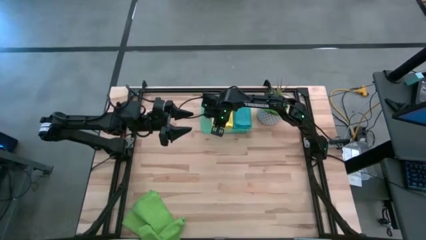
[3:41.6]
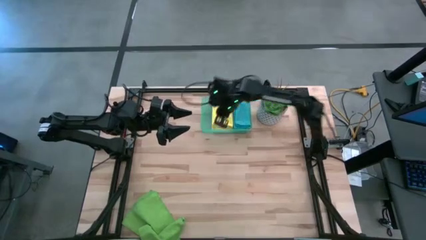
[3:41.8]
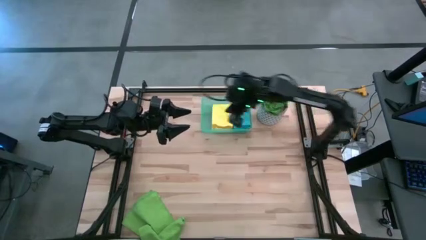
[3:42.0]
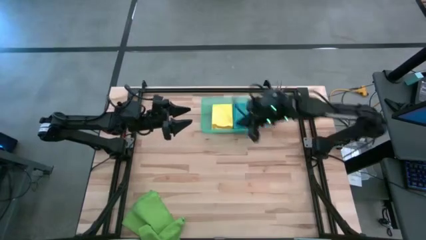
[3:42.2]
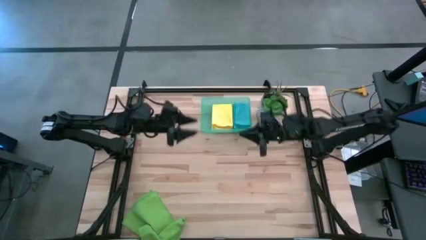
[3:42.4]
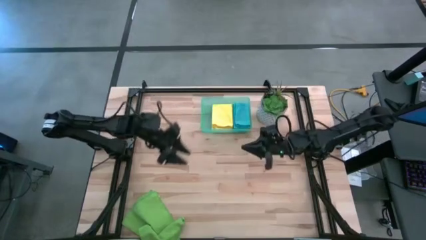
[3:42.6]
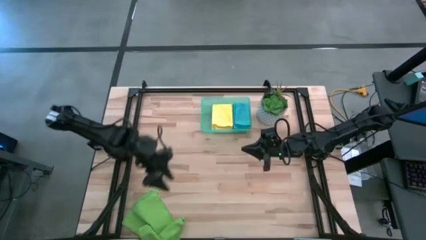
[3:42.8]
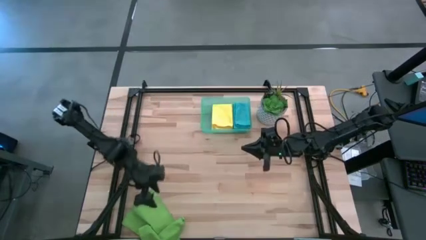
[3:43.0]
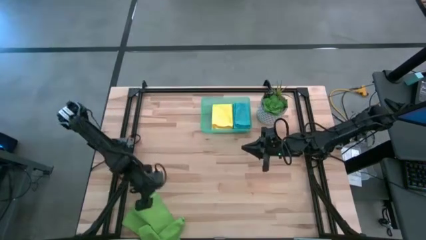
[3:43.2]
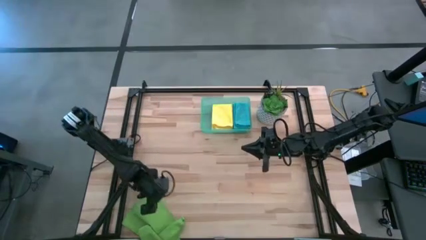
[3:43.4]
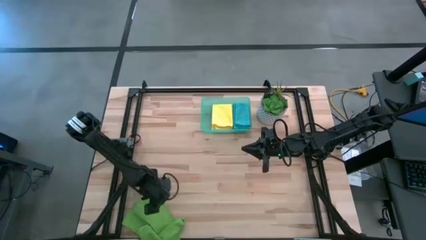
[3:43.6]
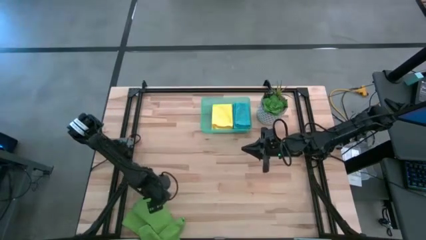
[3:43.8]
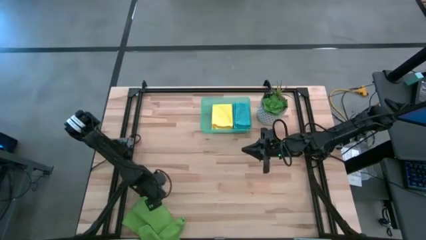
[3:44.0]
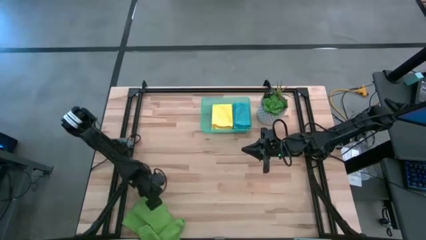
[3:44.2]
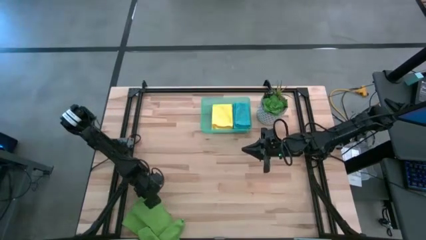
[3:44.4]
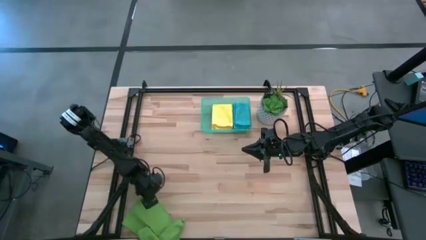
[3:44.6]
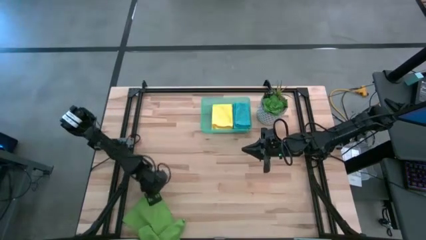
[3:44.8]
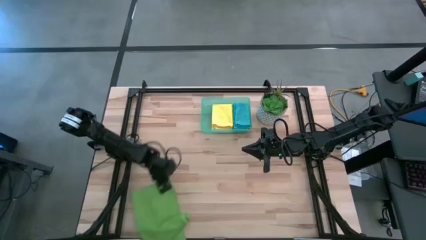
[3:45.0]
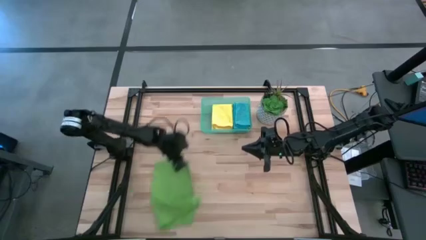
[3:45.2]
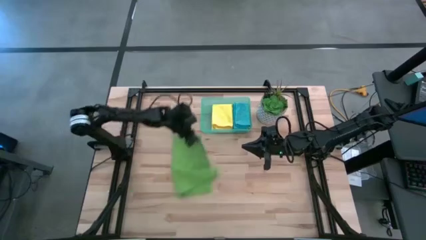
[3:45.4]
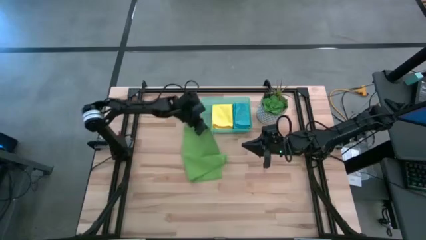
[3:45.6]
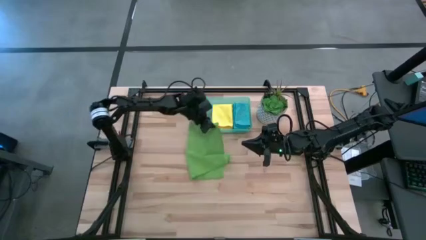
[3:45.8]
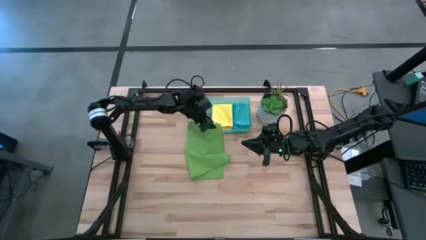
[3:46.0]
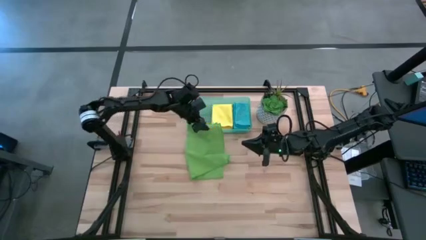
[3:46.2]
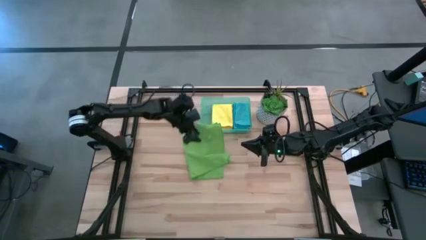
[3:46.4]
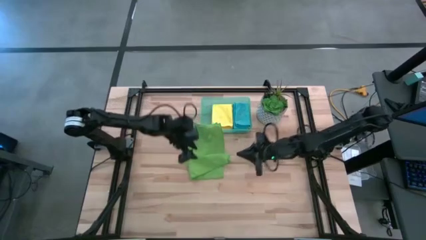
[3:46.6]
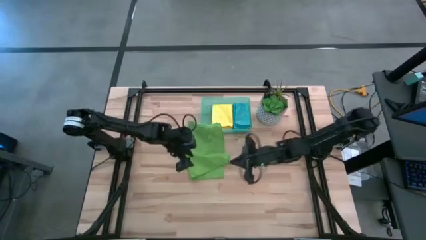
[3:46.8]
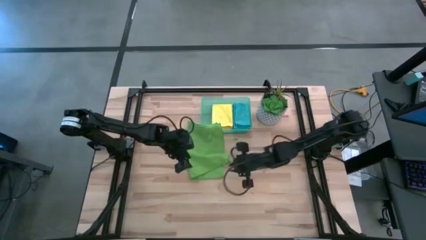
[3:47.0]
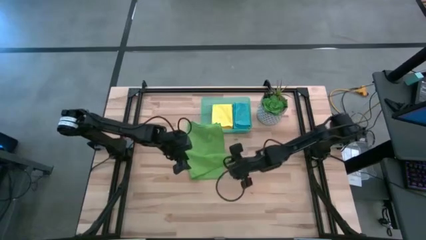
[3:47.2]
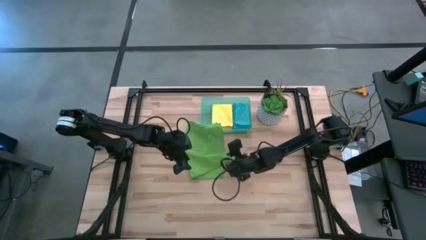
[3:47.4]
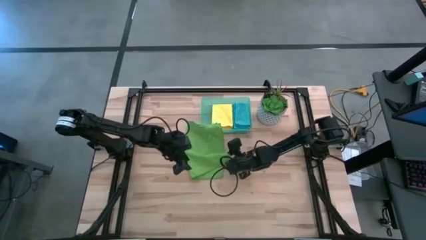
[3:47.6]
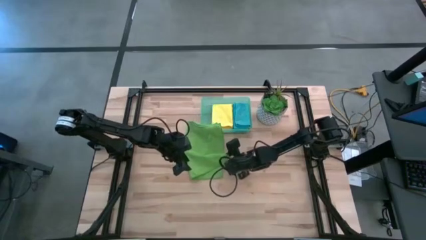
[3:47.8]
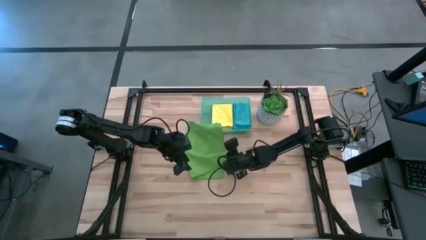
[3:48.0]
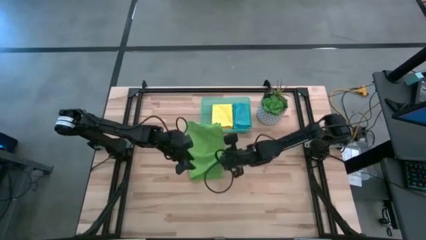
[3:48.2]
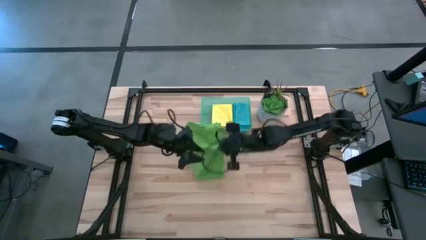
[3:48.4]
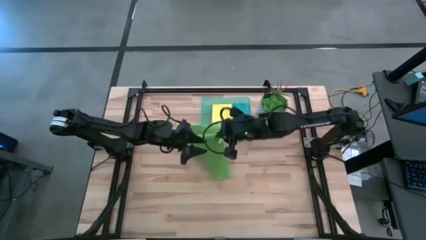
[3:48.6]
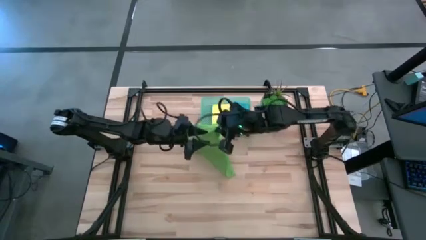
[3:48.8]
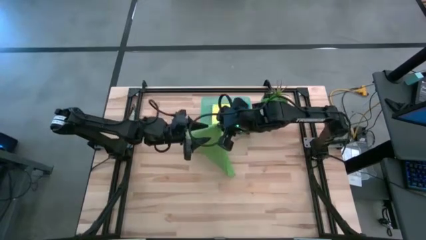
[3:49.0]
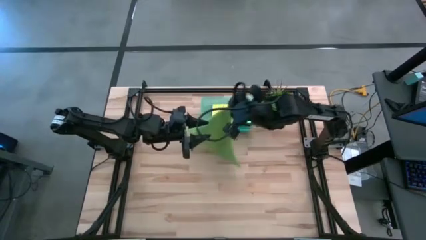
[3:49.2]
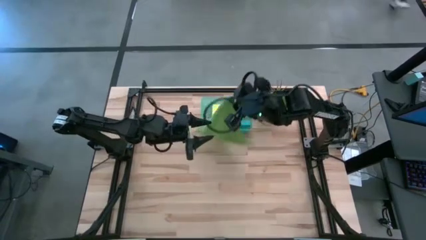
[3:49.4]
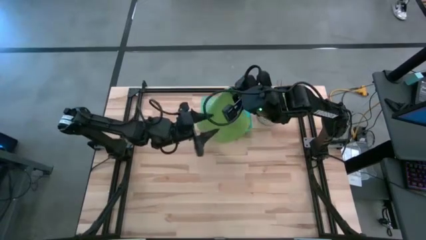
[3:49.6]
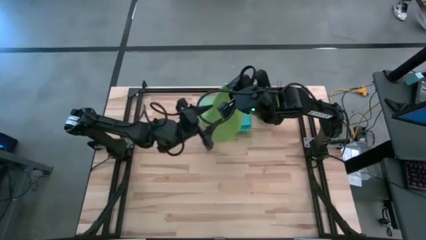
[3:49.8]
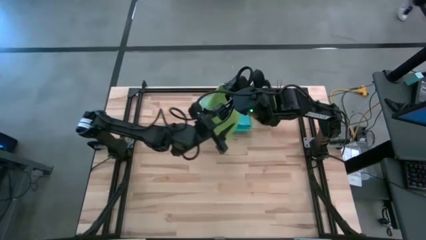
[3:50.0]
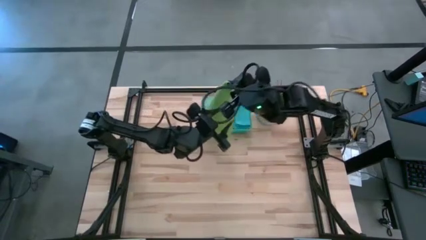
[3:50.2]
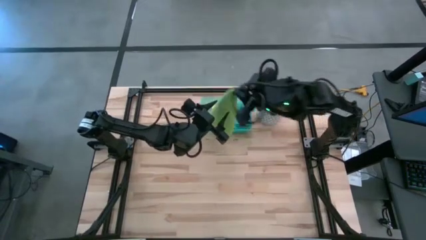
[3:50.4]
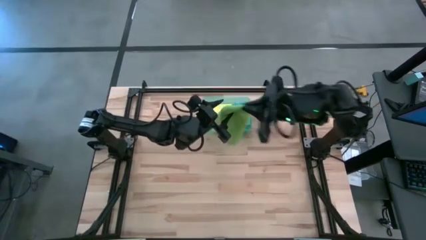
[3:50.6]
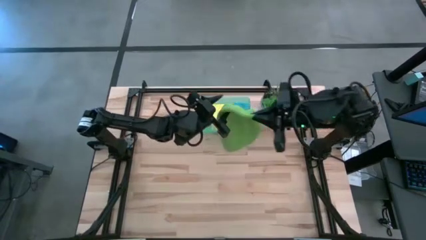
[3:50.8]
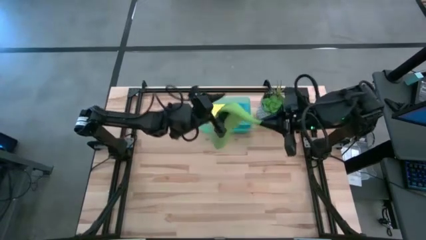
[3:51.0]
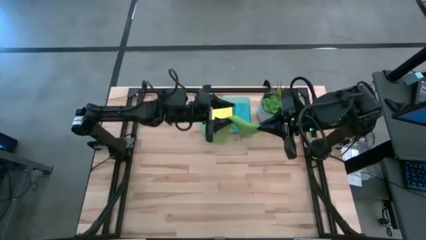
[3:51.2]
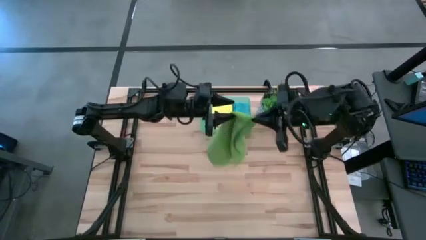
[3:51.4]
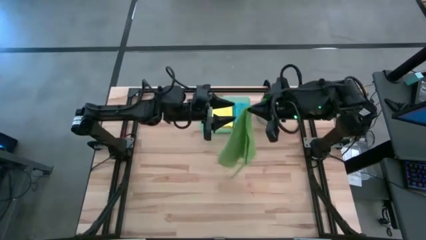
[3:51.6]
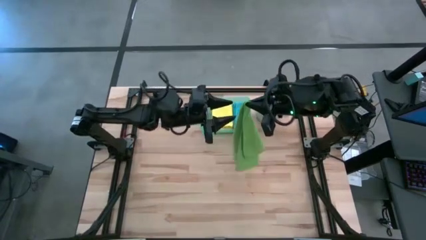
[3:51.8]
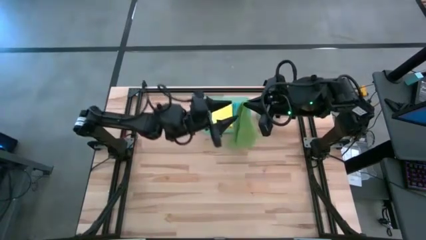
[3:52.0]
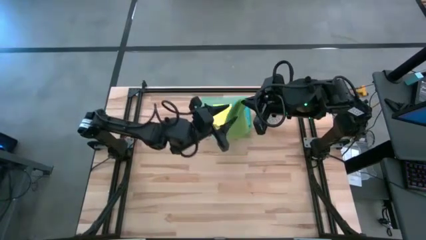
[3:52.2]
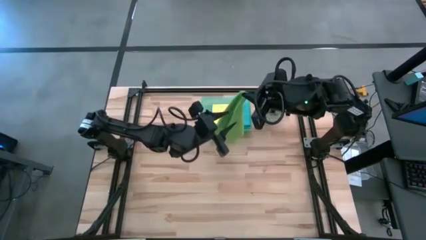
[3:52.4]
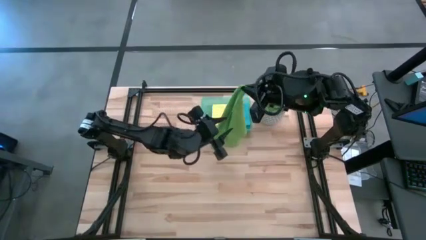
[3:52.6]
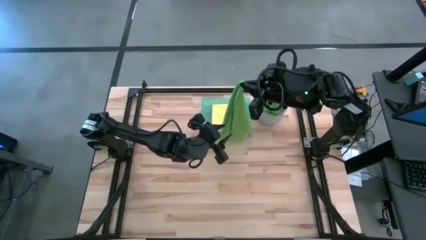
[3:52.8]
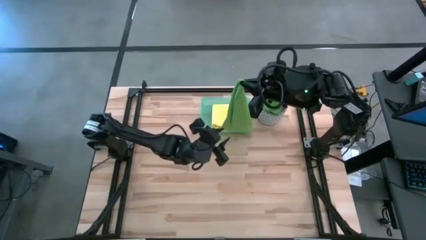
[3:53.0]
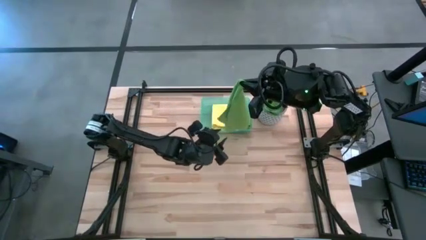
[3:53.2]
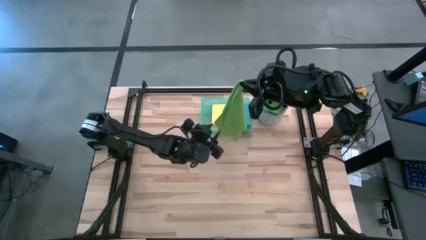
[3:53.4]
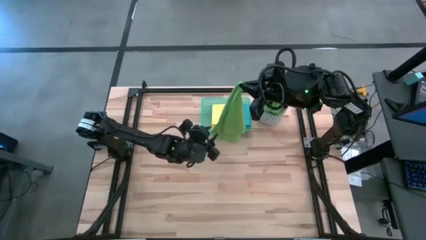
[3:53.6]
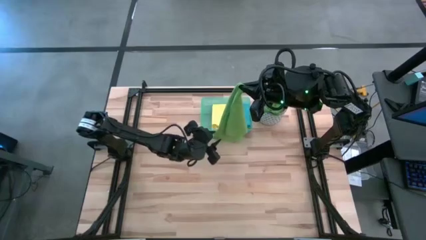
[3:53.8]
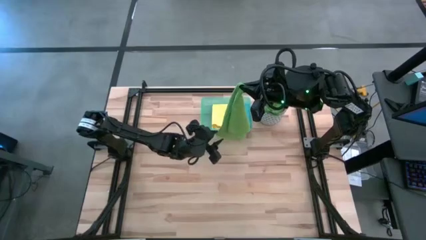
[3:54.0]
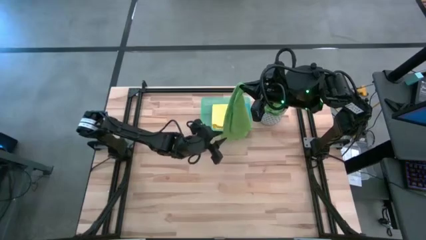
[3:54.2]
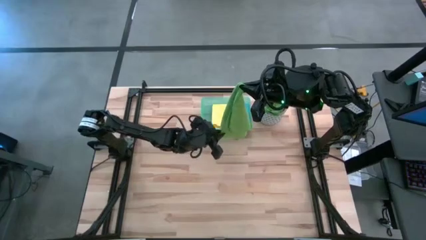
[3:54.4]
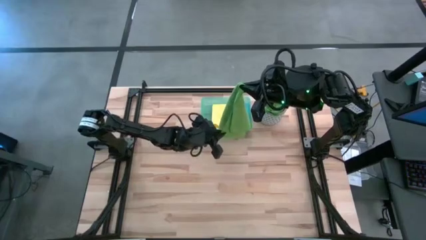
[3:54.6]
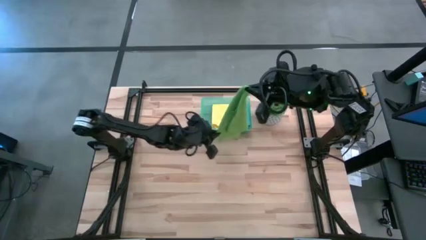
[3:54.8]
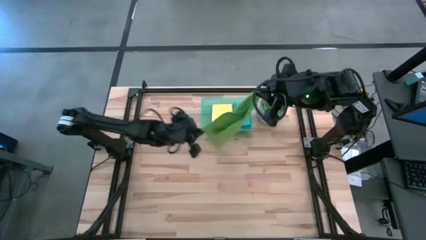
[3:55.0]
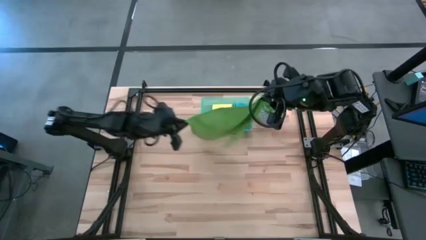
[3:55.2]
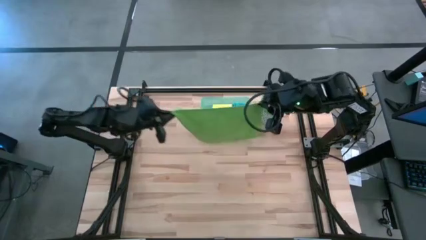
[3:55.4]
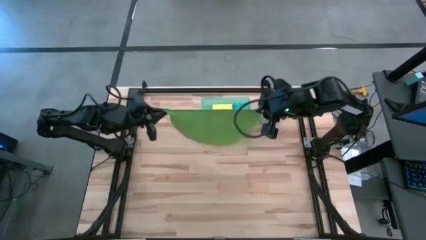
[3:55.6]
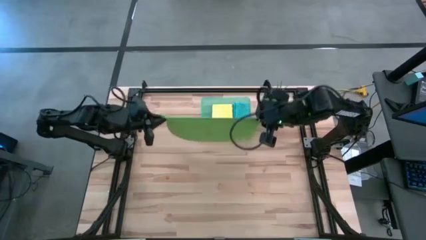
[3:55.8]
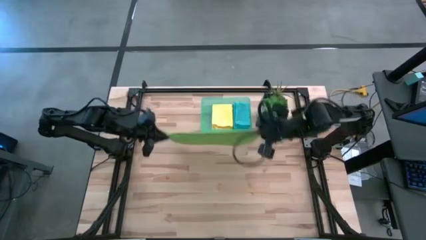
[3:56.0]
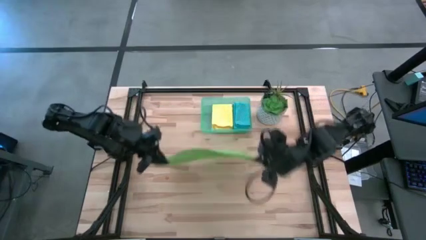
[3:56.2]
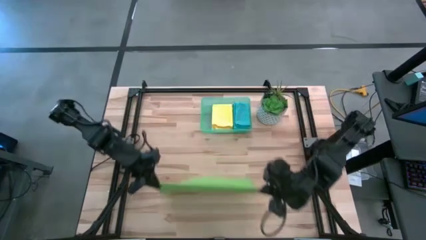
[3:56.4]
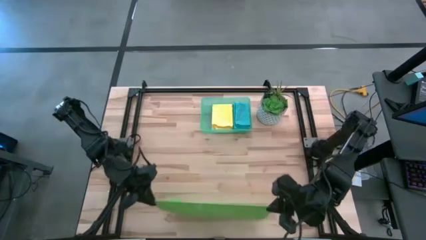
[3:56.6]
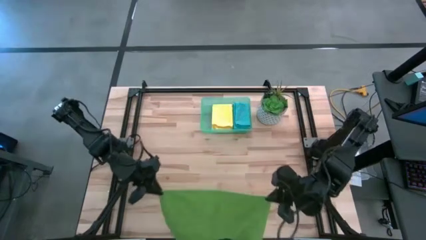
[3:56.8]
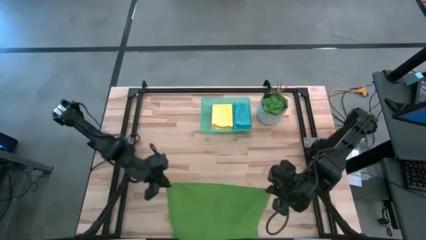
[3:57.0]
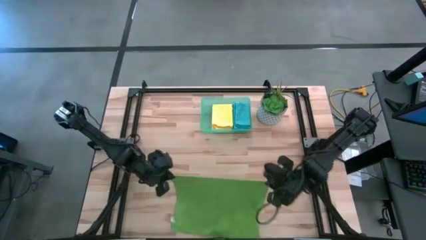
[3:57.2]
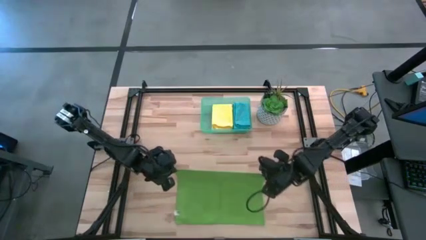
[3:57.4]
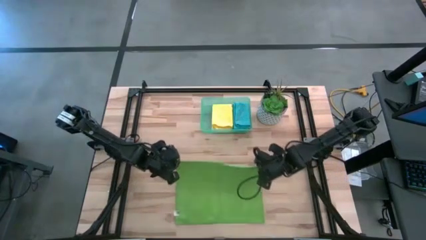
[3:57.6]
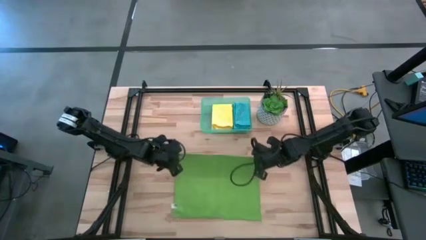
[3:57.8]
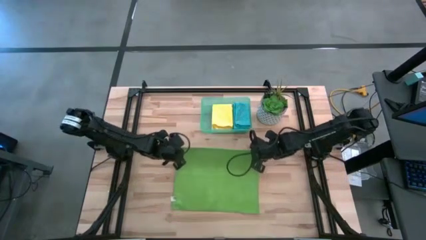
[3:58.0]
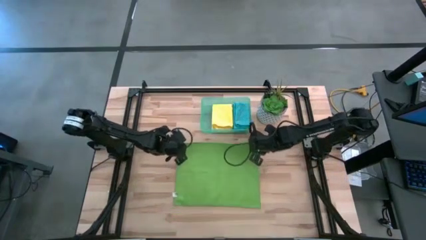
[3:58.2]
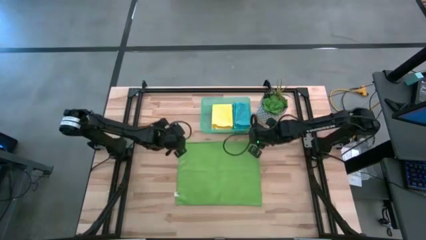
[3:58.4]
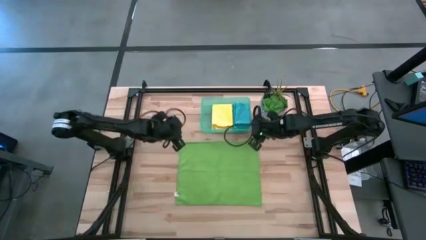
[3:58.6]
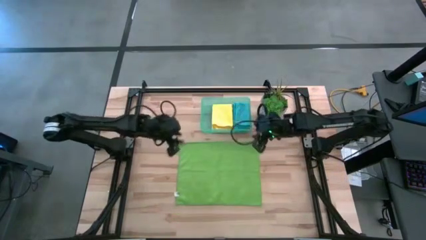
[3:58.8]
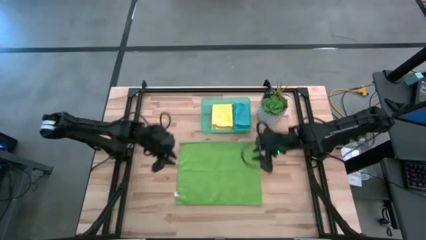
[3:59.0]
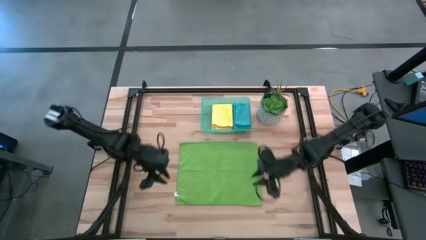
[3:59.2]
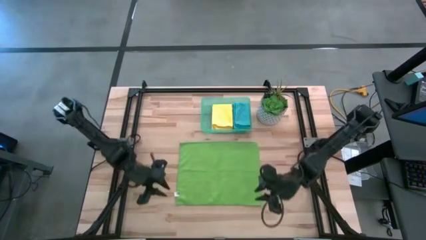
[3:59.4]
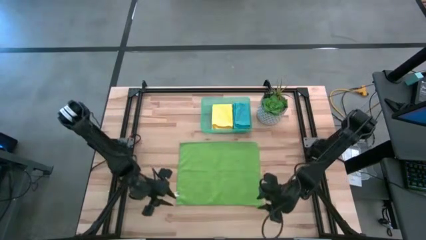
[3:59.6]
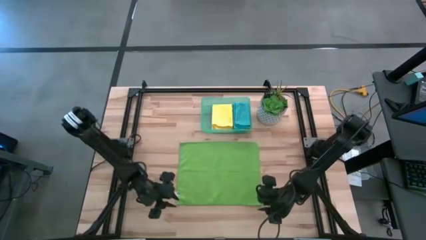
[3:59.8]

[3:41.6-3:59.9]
Task: Fold microfiber towels
Fold the green microfiber cloth
